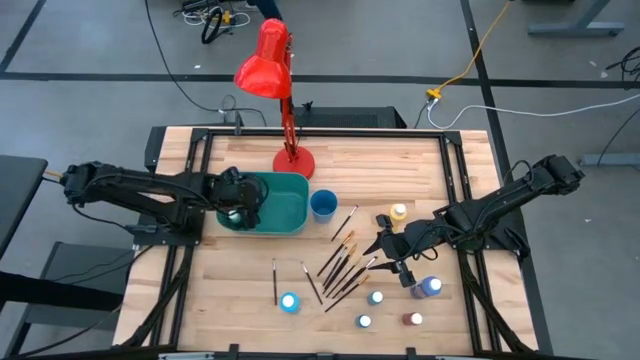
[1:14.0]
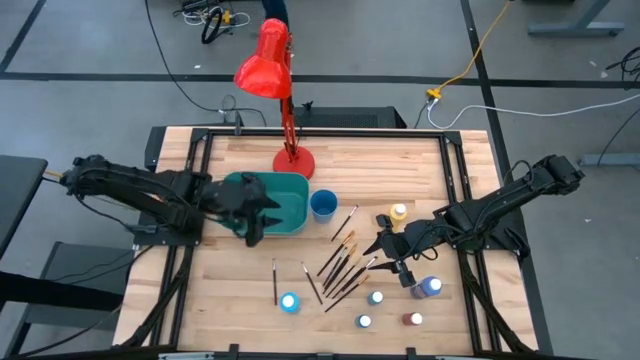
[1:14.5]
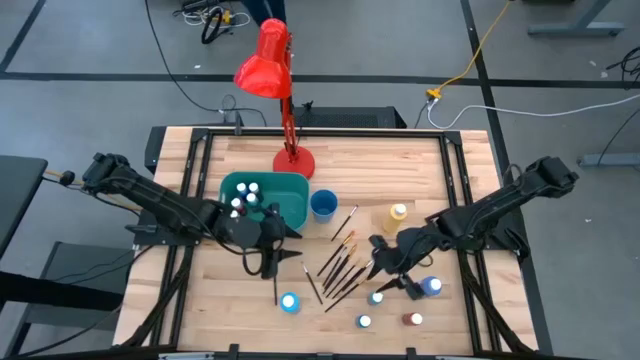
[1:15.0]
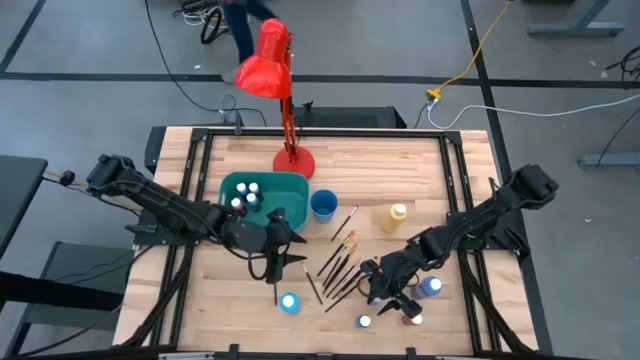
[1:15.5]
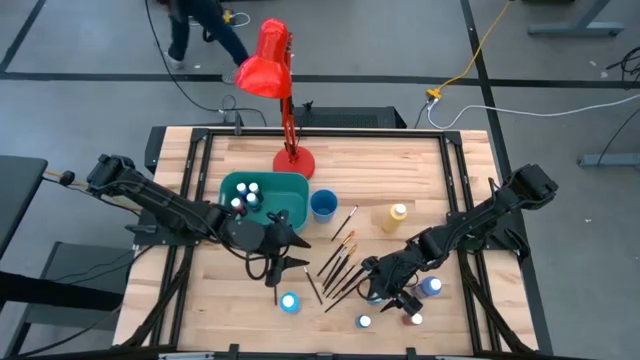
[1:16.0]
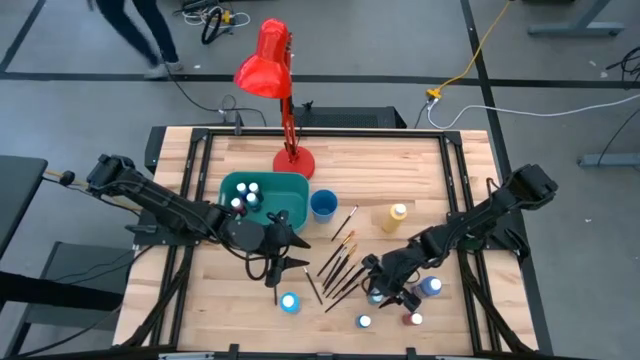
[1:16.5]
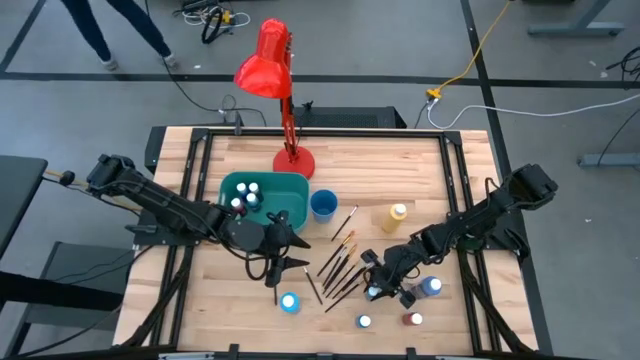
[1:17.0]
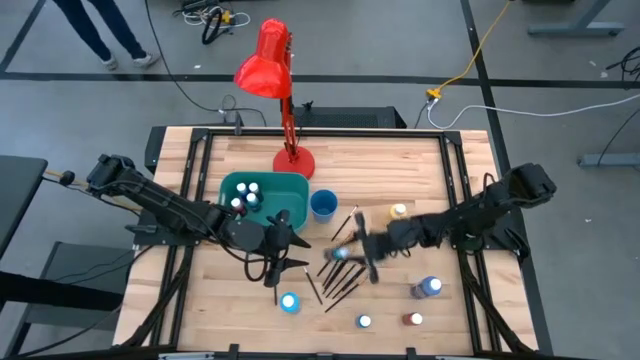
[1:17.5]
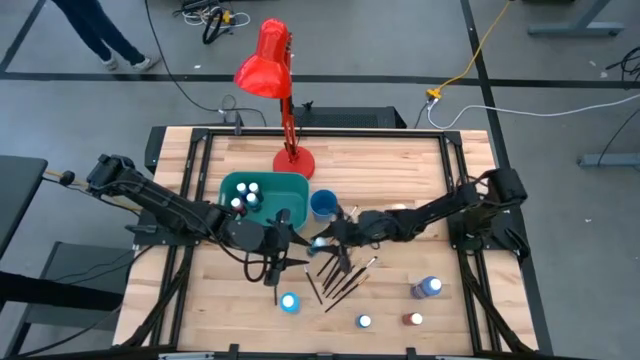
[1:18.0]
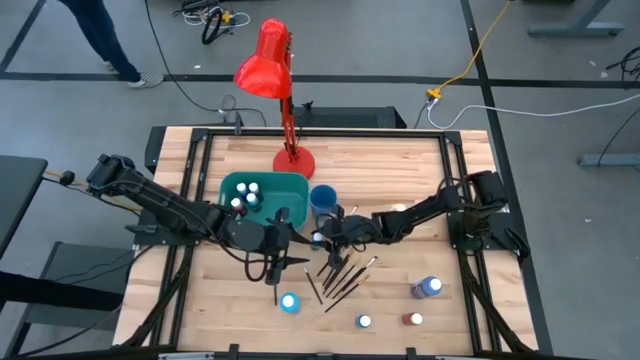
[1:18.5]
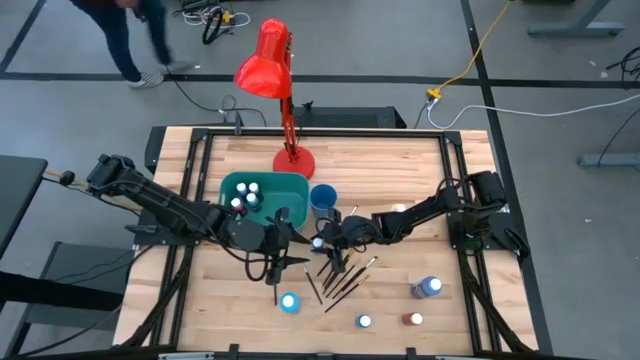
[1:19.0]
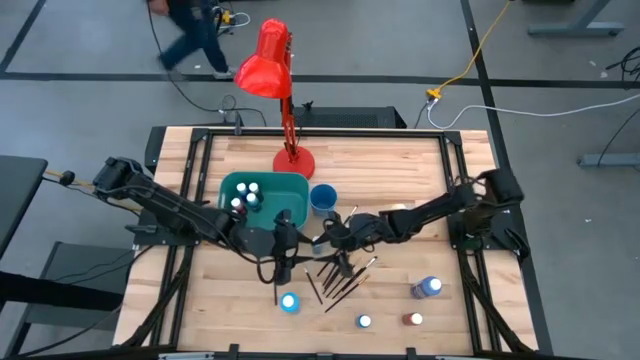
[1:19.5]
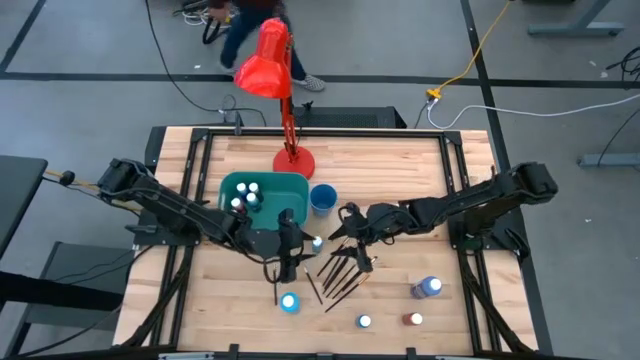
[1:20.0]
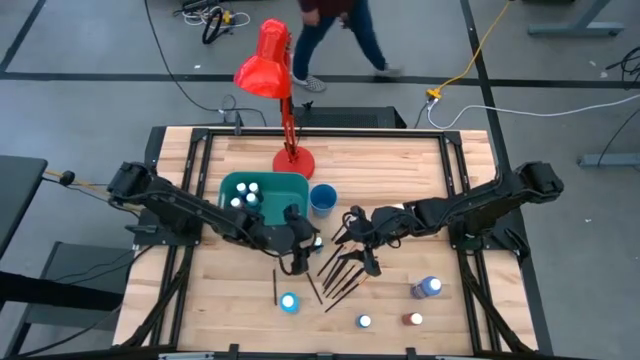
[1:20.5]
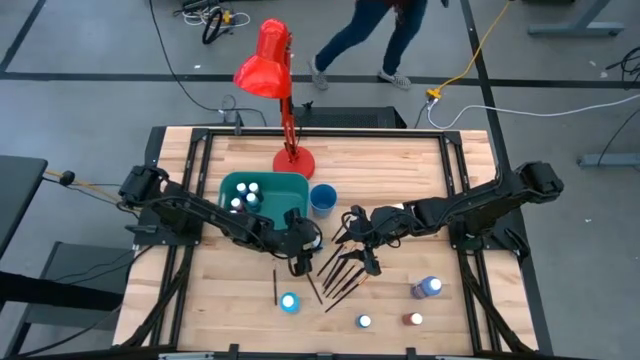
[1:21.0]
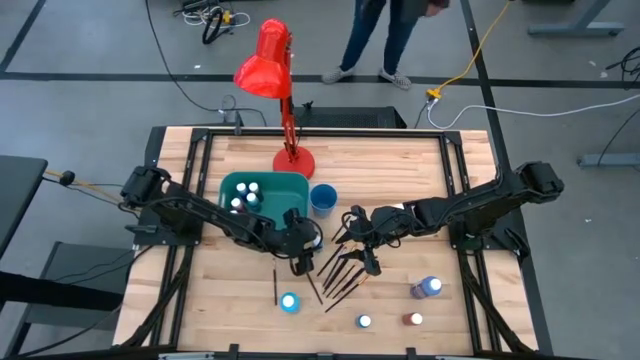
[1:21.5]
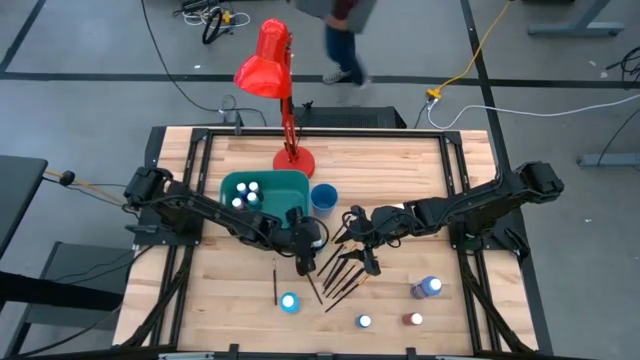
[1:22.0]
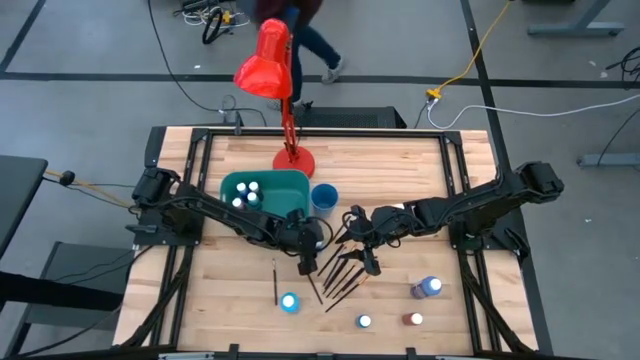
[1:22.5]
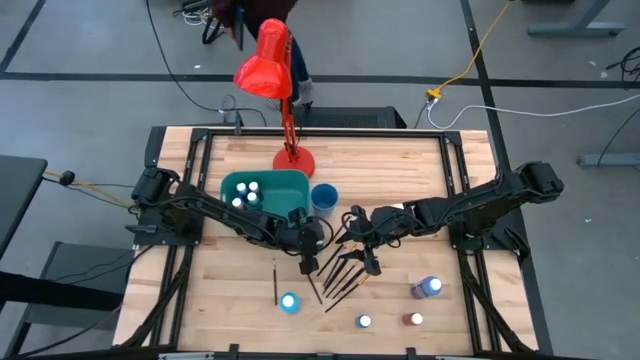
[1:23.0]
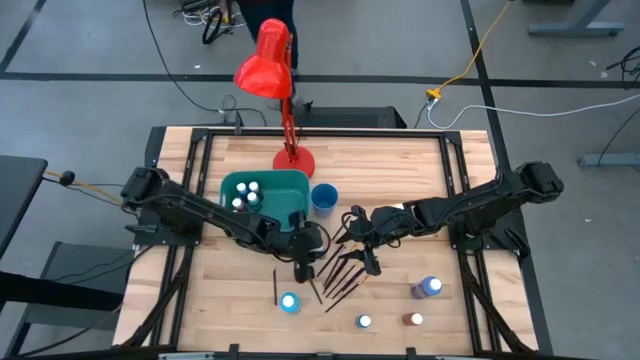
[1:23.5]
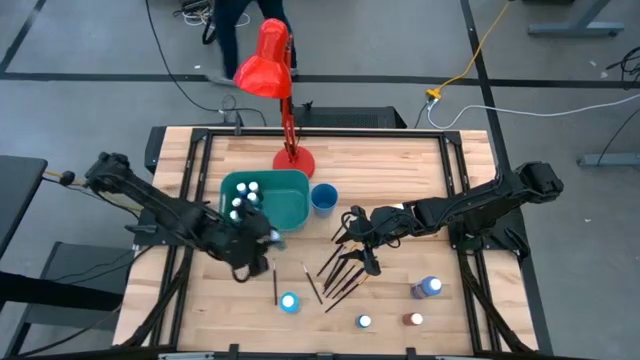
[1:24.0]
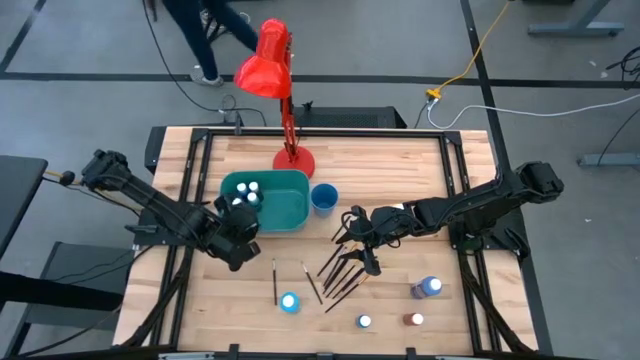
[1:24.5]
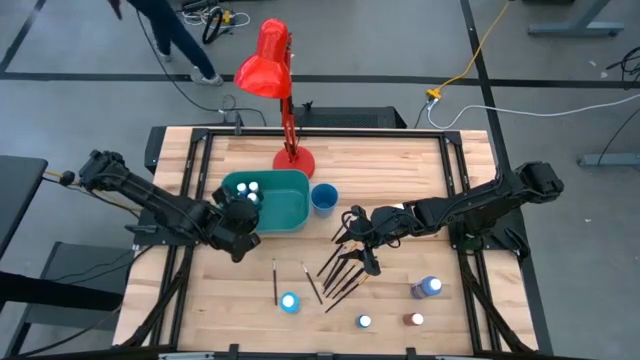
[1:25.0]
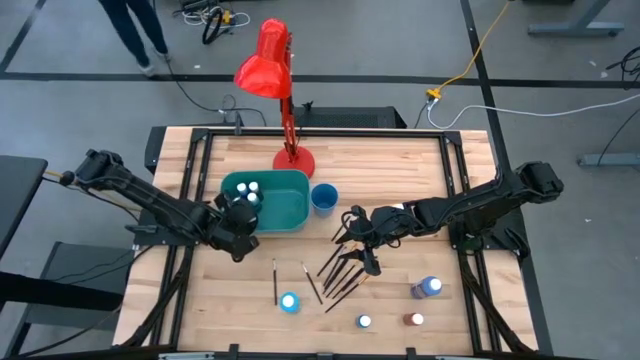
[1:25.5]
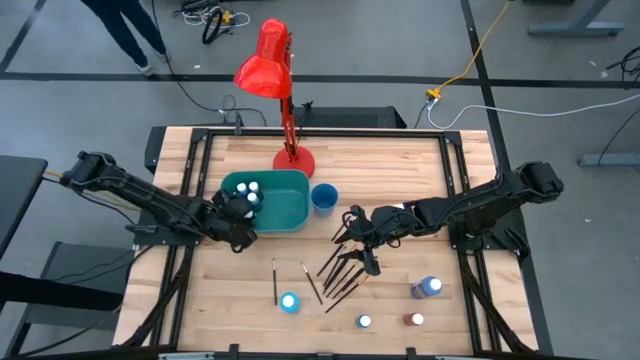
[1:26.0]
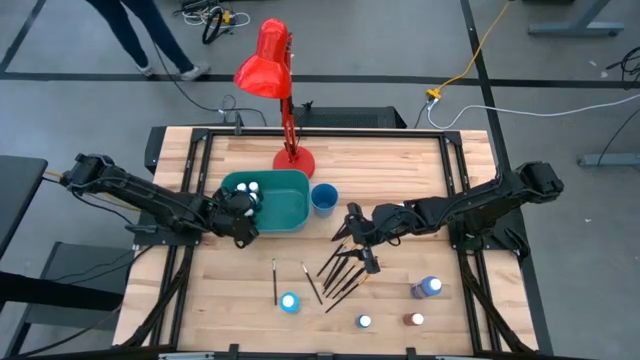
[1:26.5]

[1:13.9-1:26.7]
Task: Pick & Place Paint Supplies
Put the dark green paint bottle into the green bin

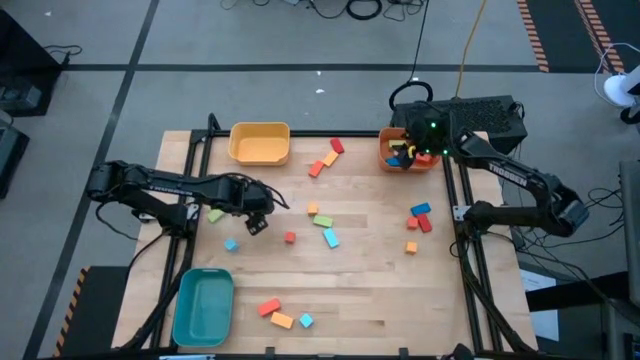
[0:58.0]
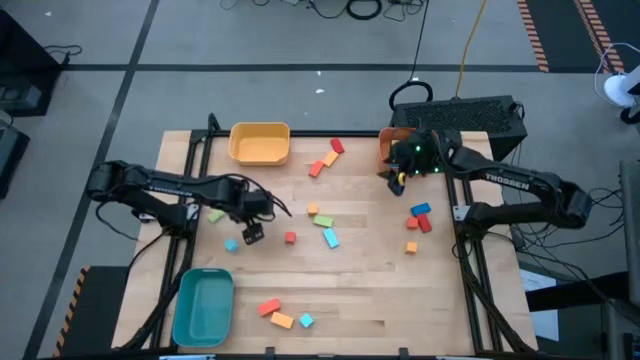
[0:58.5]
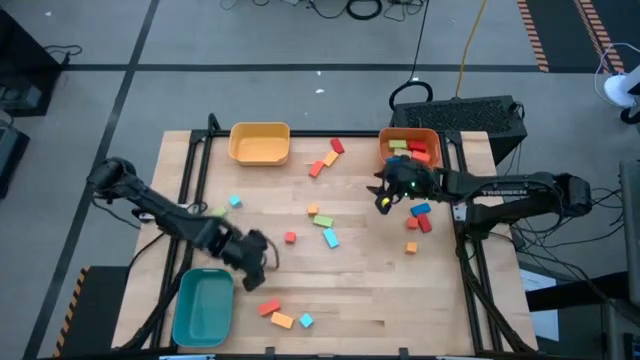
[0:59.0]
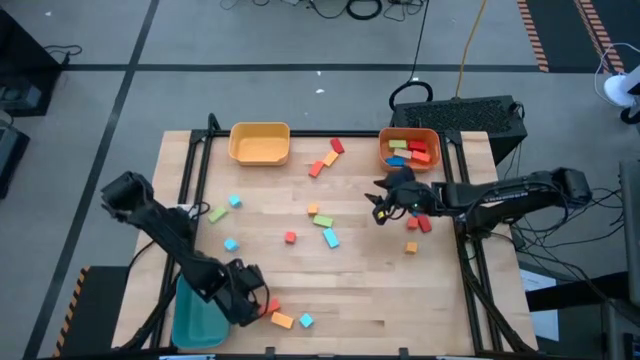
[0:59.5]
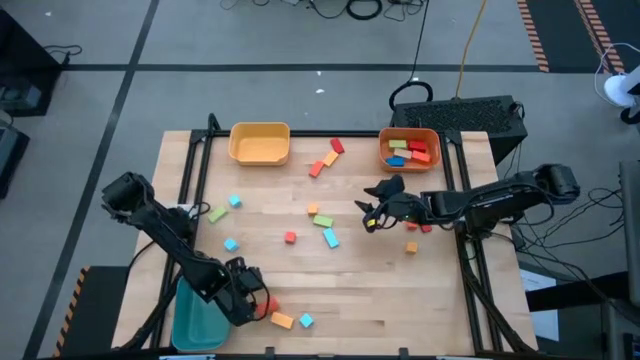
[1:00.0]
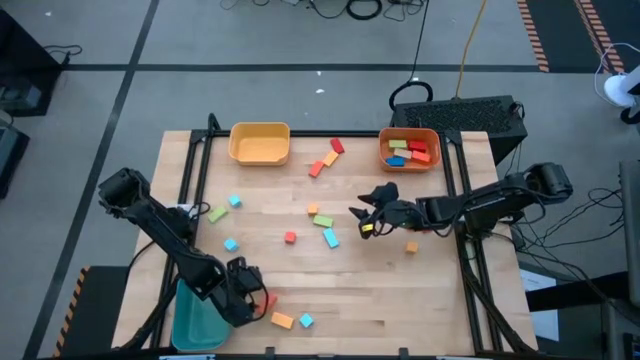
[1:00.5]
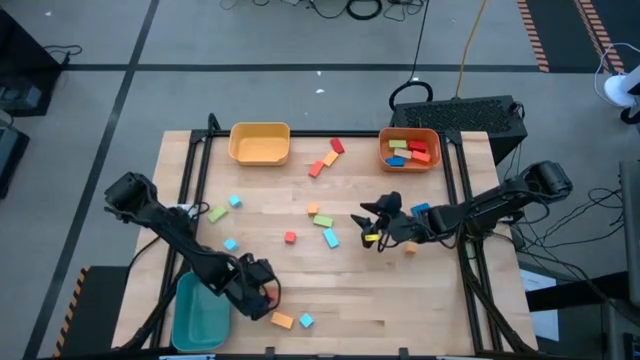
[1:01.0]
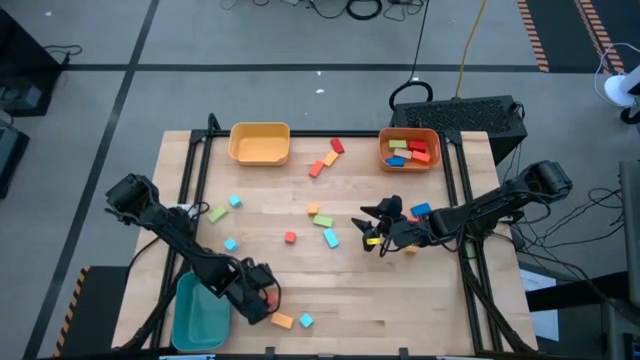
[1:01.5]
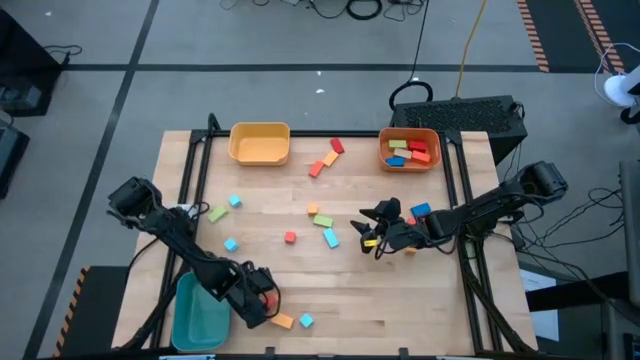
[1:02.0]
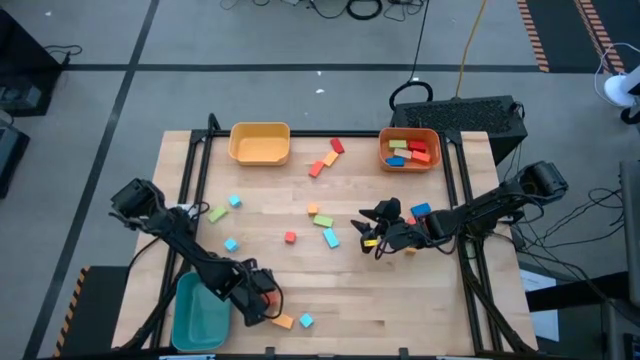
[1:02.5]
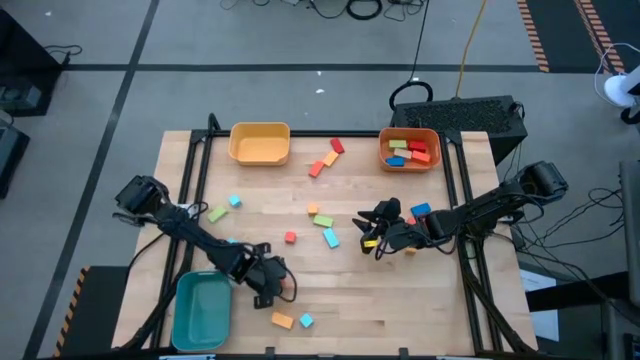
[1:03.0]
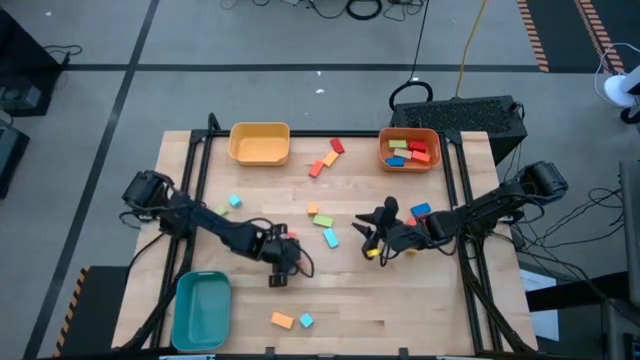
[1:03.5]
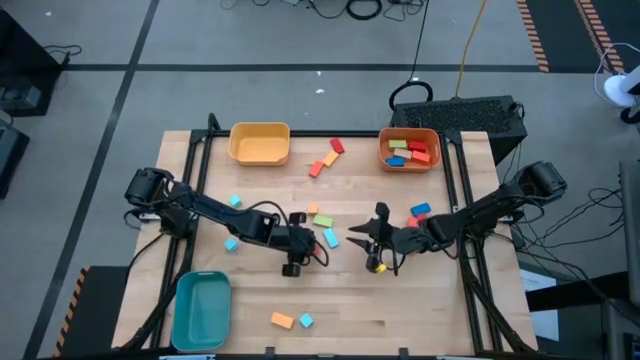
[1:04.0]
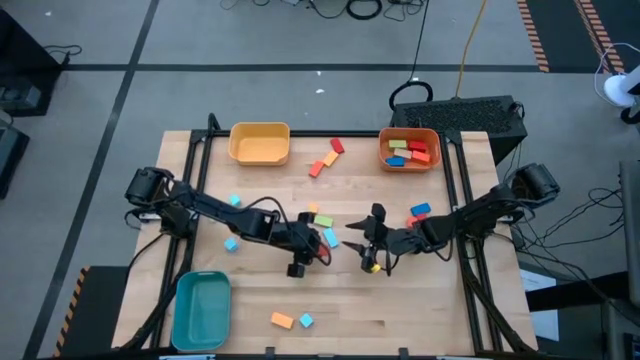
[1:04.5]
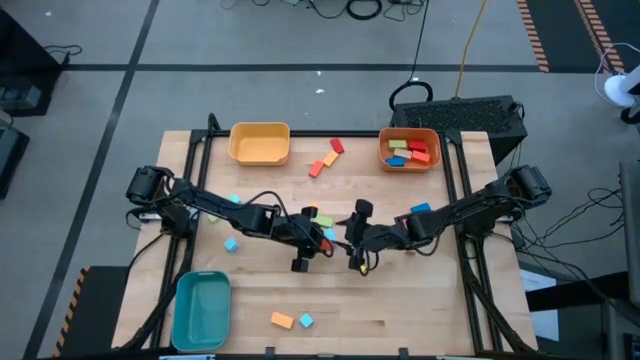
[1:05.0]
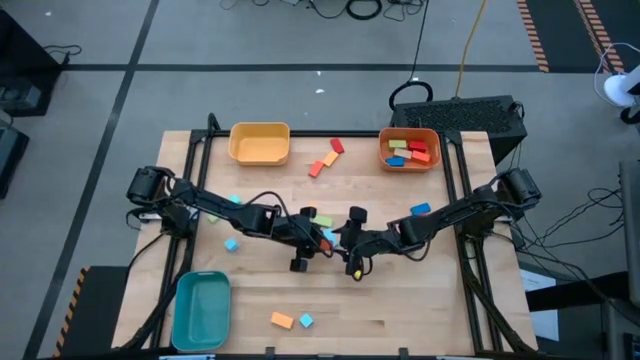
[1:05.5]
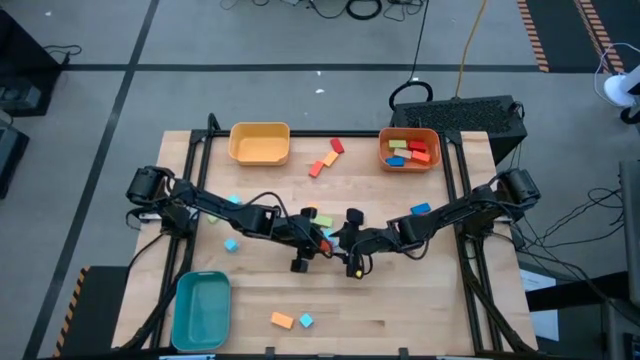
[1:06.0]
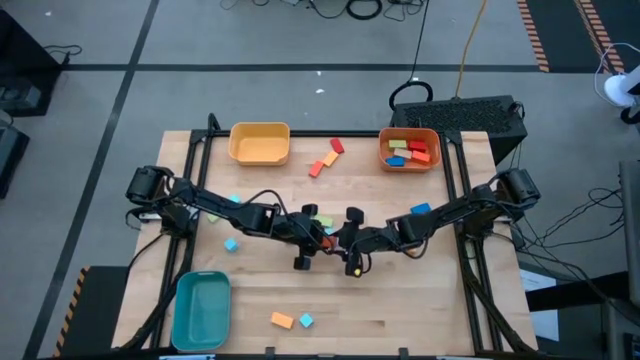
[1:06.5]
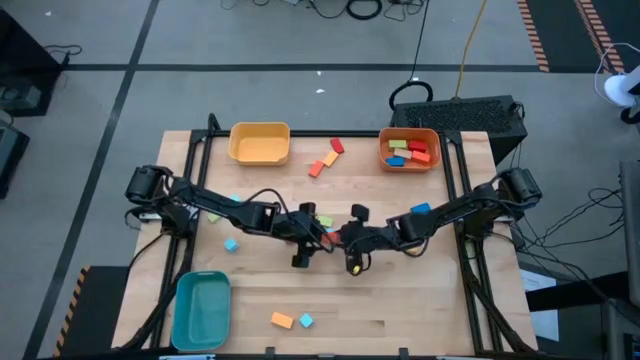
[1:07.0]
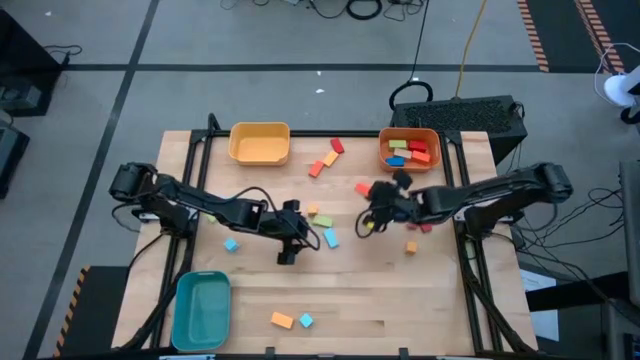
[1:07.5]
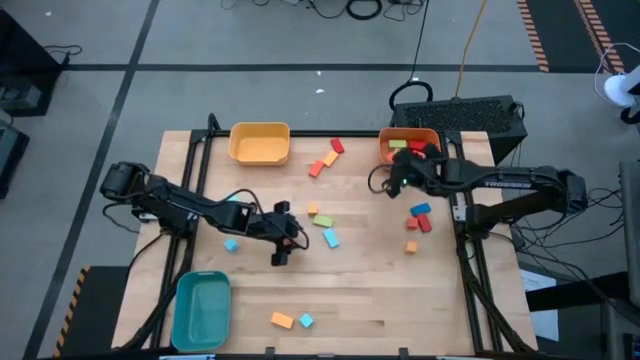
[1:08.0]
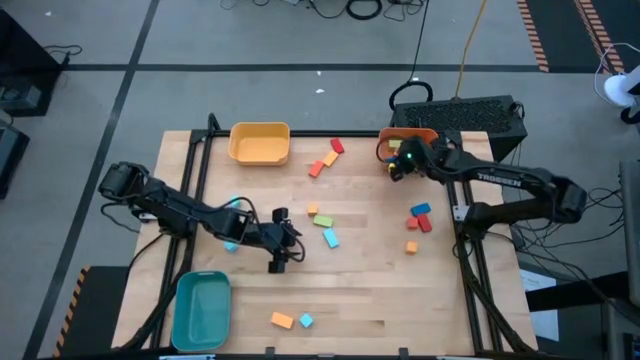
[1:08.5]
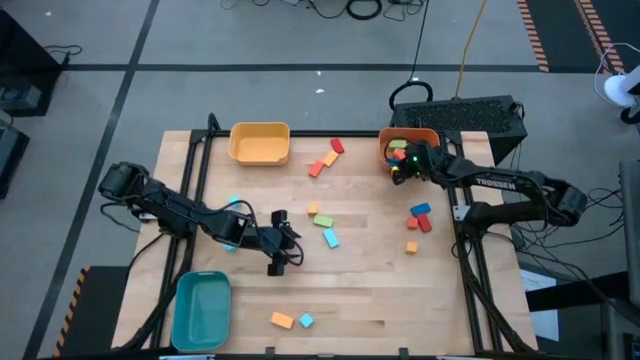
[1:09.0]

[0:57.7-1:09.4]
Task: Sort blocks by size
Put the large orange block into the orange bin
